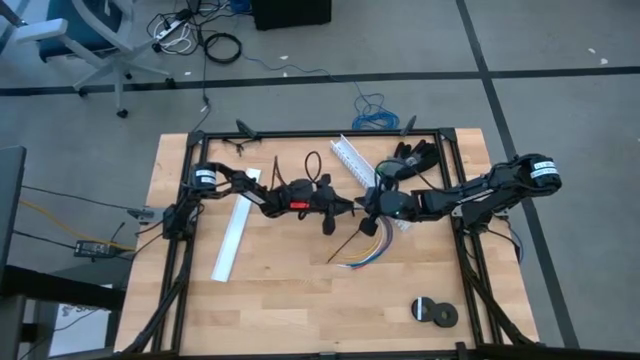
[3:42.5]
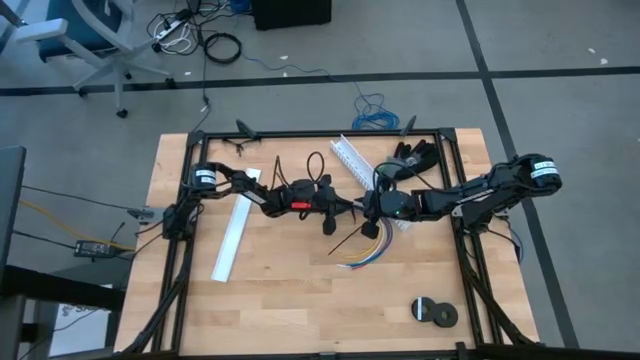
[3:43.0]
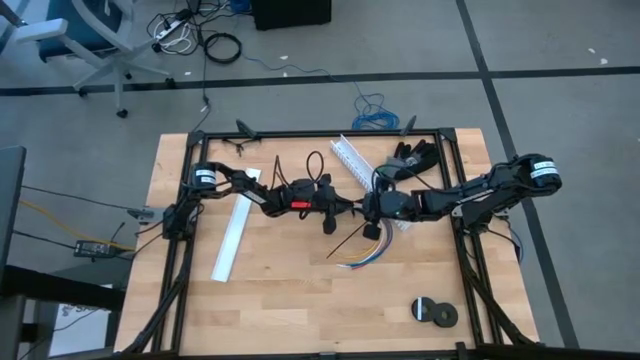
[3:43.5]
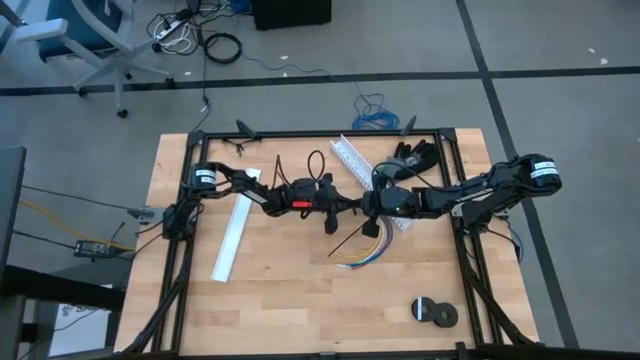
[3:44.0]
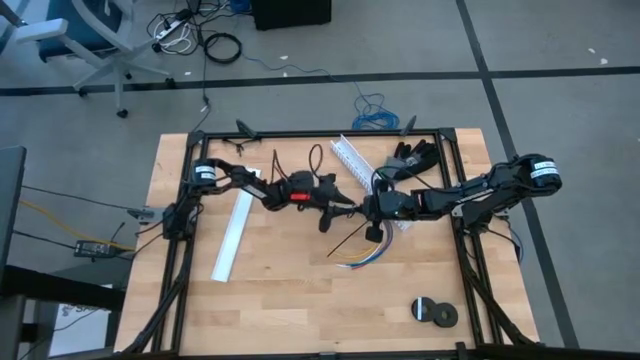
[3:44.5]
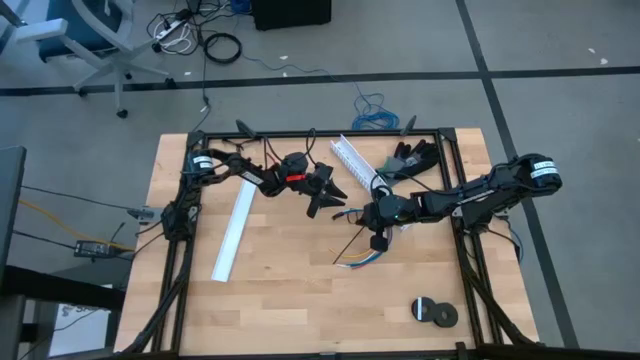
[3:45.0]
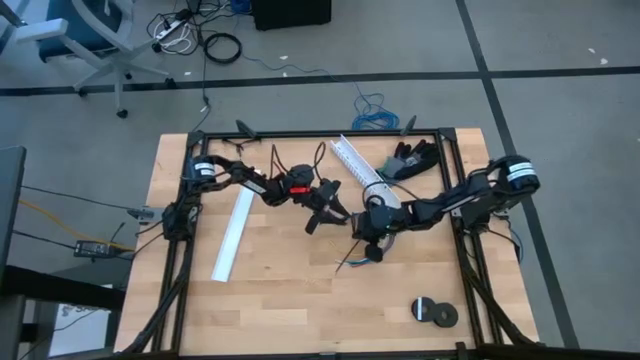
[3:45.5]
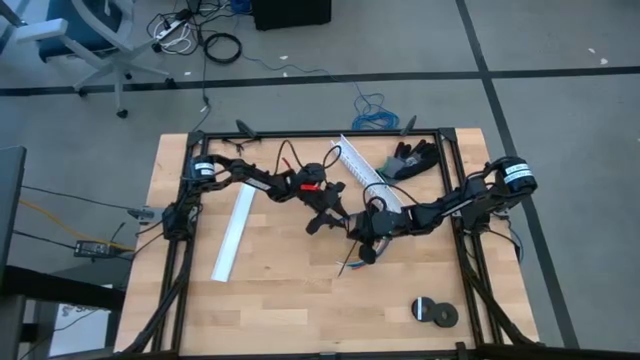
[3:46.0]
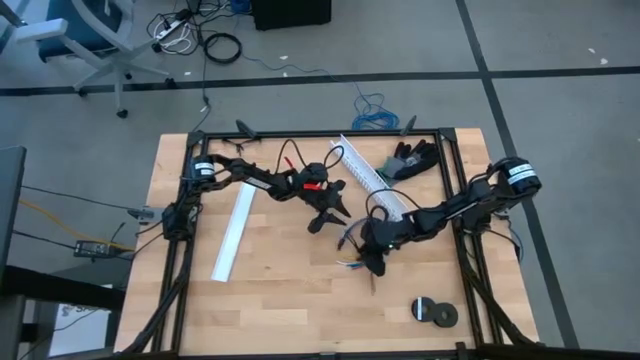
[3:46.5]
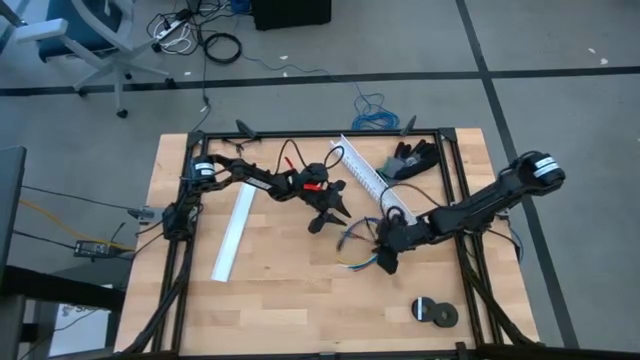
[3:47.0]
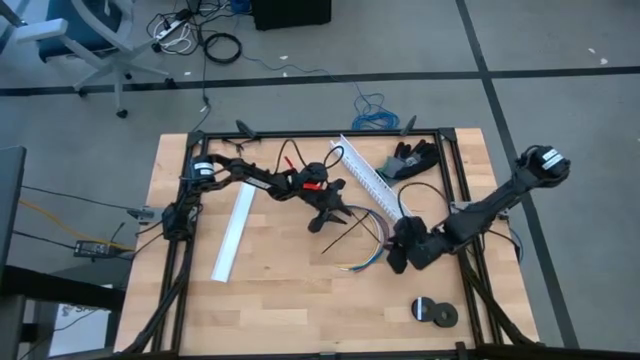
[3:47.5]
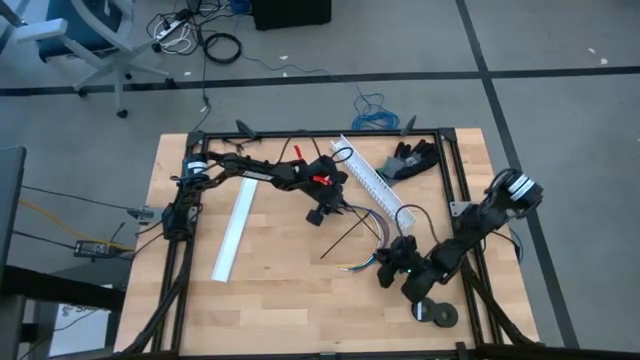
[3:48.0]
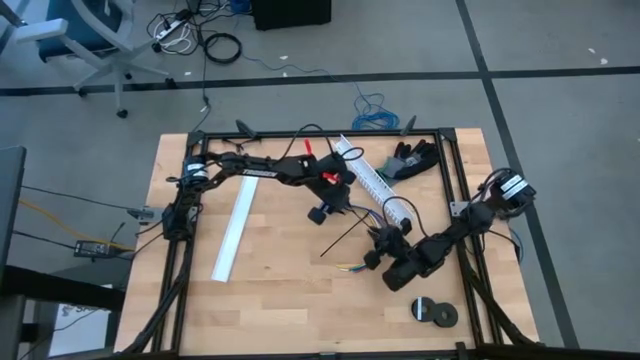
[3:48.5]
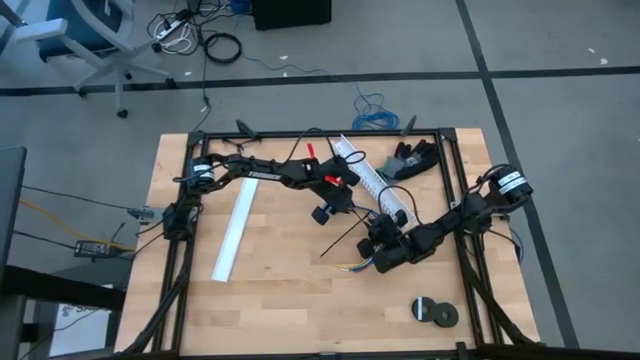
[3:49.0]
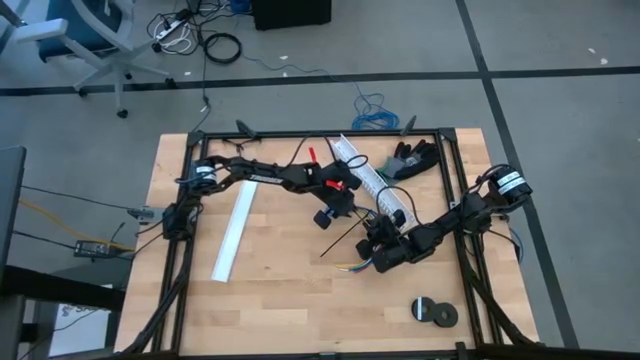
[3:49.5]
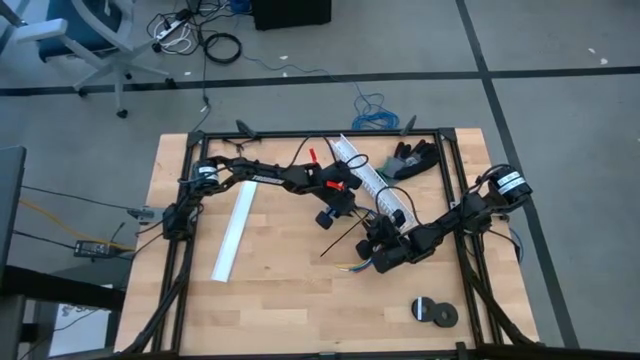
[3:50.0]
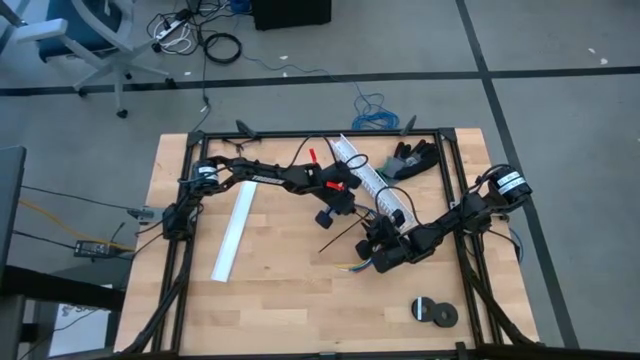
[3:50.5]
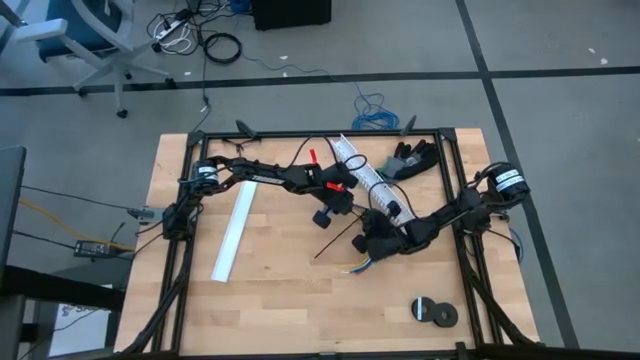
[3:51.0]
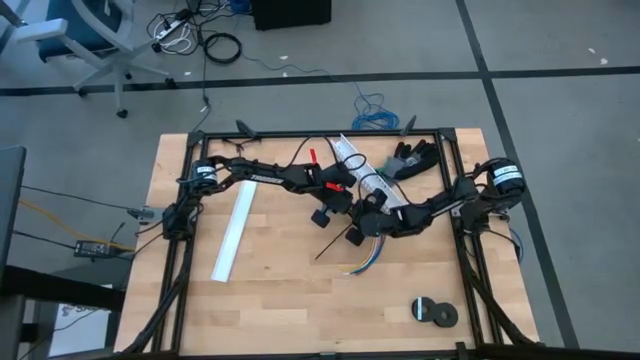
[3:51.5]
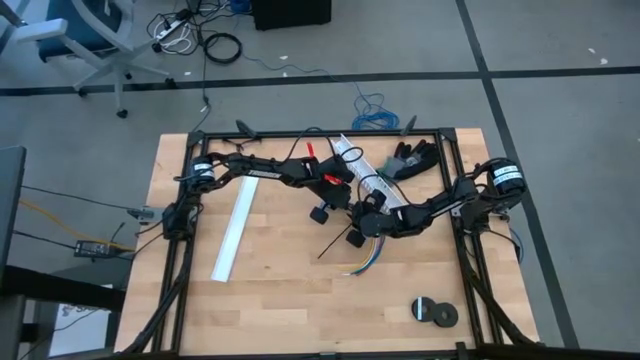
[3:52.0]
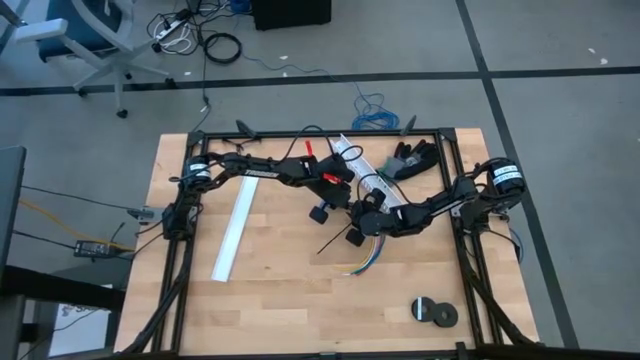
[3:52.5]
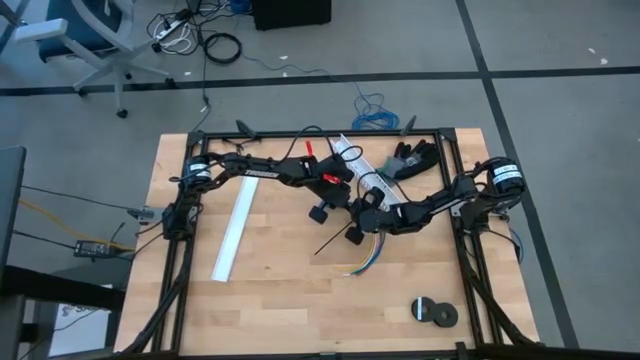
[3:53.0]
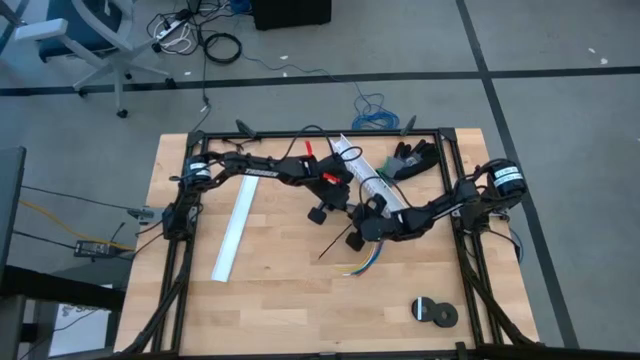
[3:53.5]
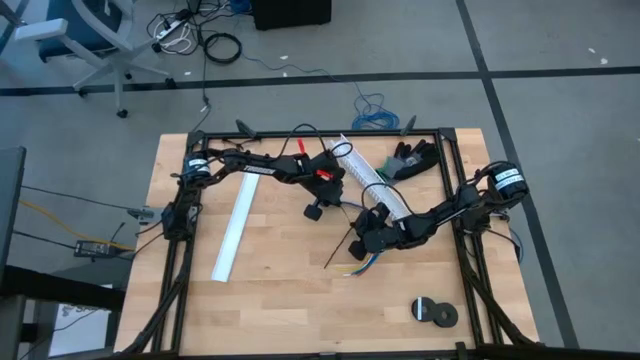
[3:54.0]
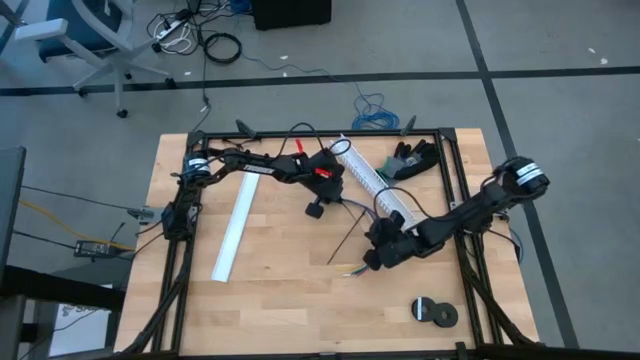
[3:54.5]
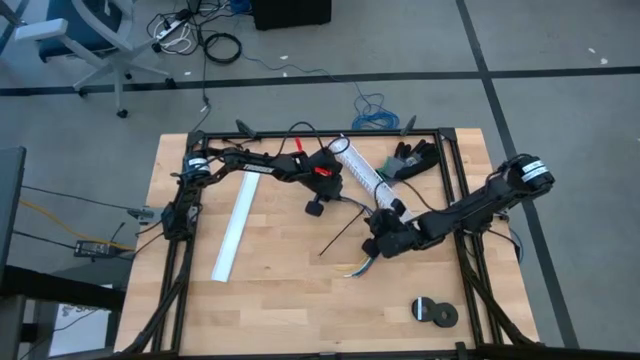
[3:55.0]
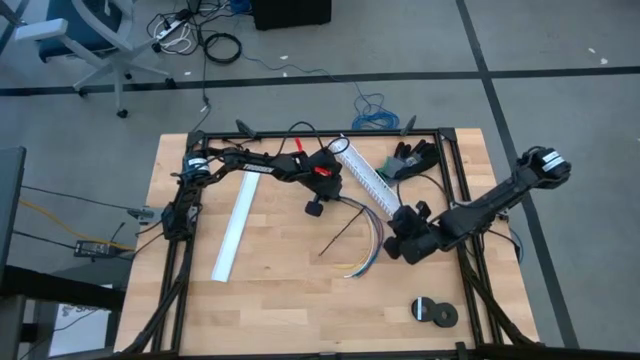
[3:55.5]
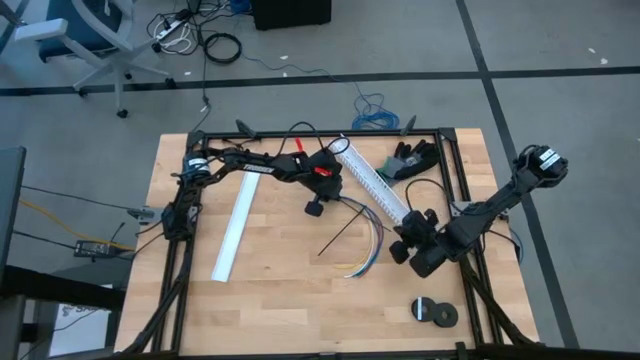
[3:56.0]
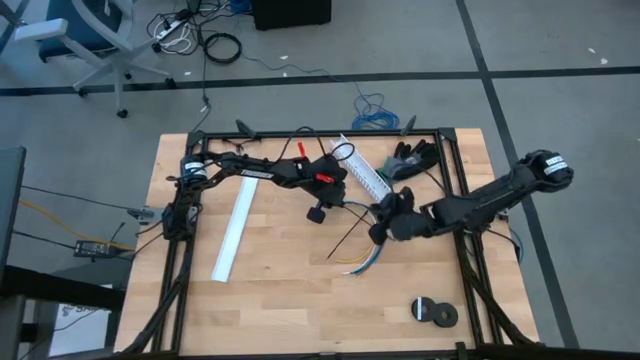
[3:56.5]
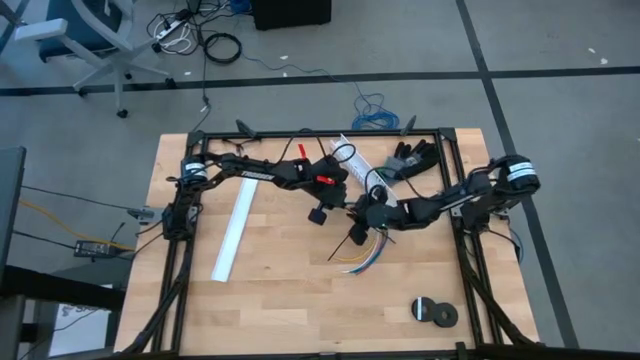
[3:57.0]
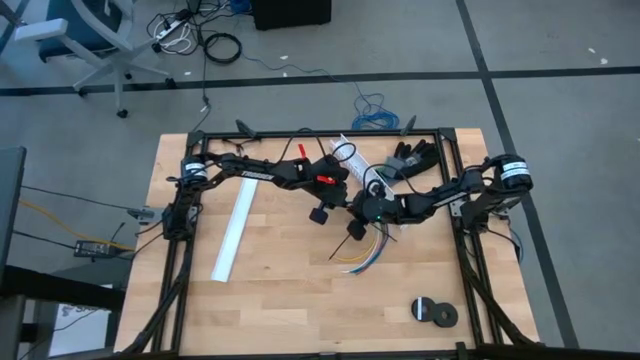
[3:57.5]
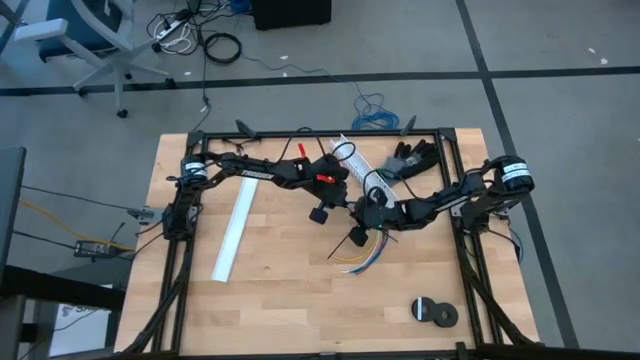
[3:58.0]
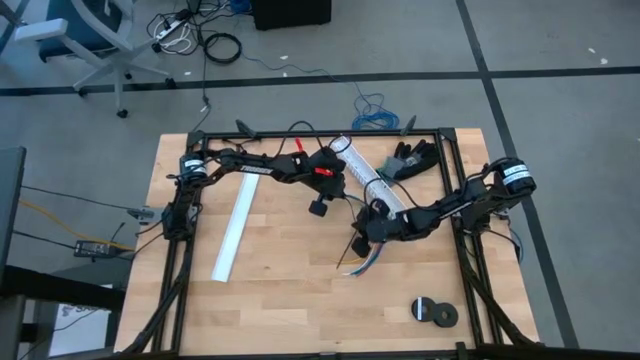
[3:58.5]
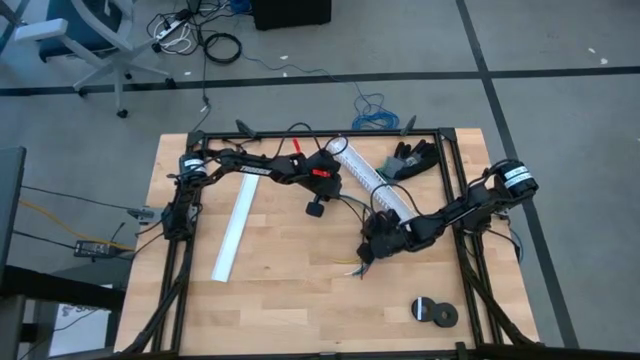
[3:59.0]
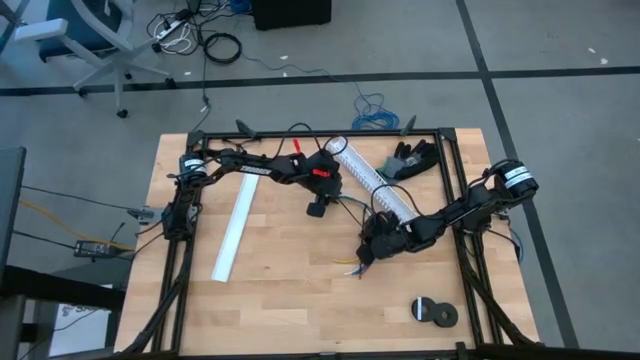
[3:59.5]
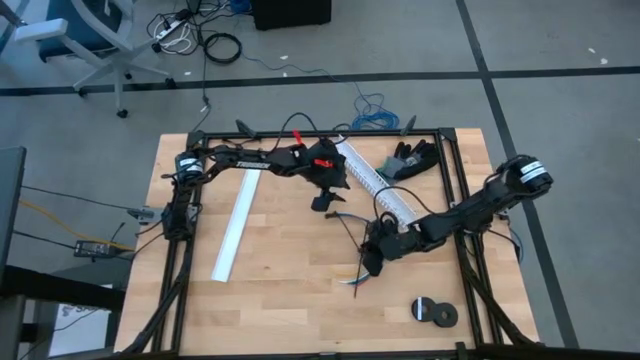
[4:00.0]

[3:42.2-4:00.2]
Task: Ziptie cables
Wrap the cable wires with black zip tie

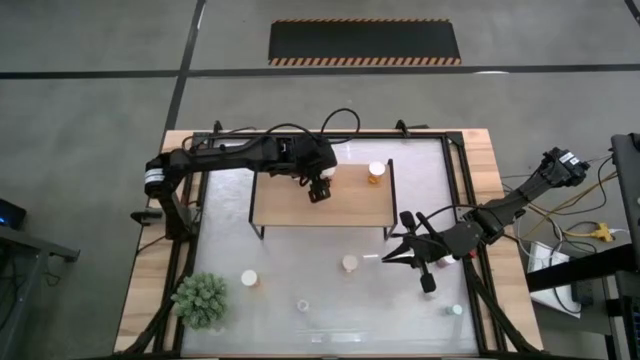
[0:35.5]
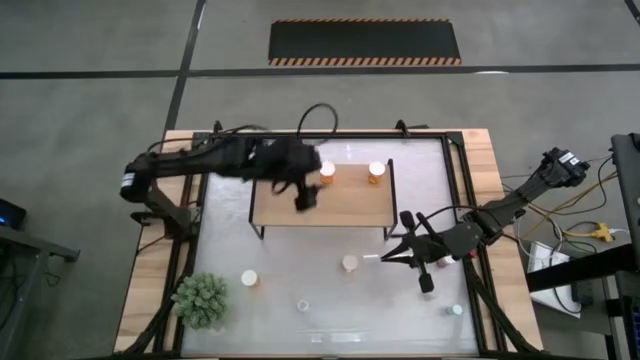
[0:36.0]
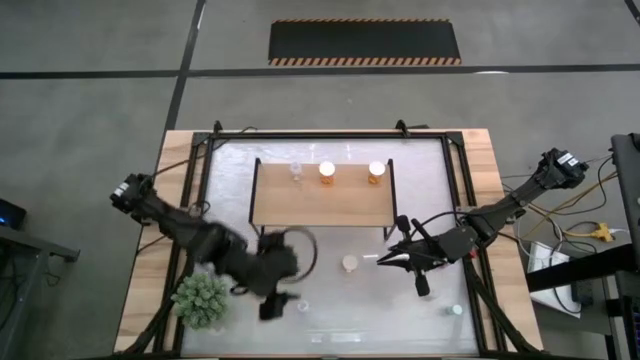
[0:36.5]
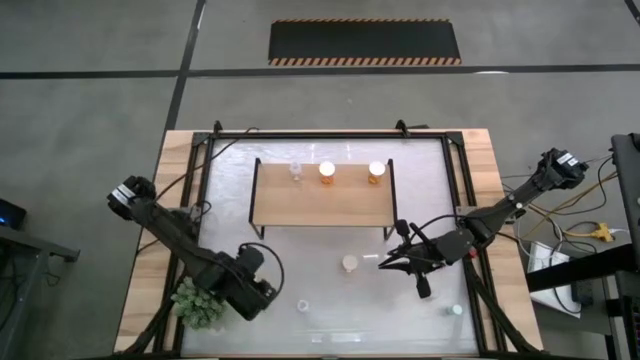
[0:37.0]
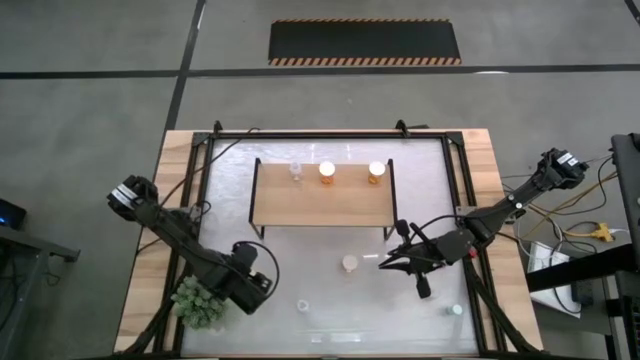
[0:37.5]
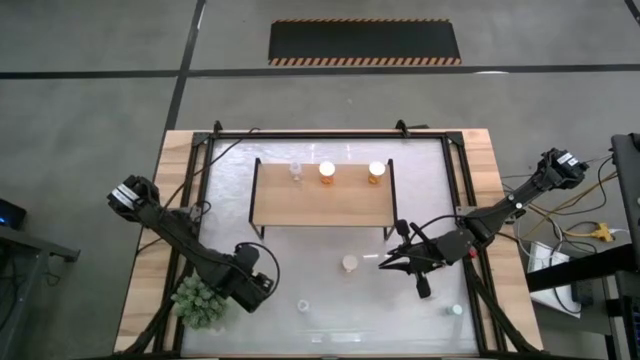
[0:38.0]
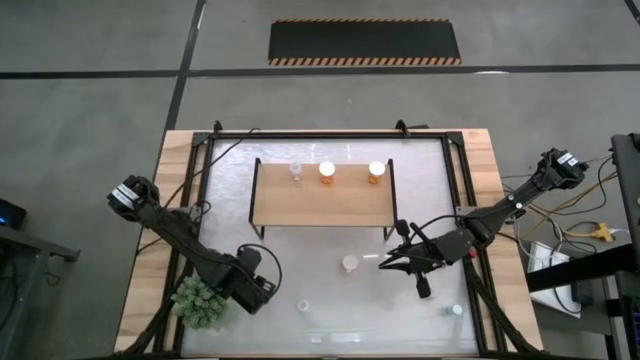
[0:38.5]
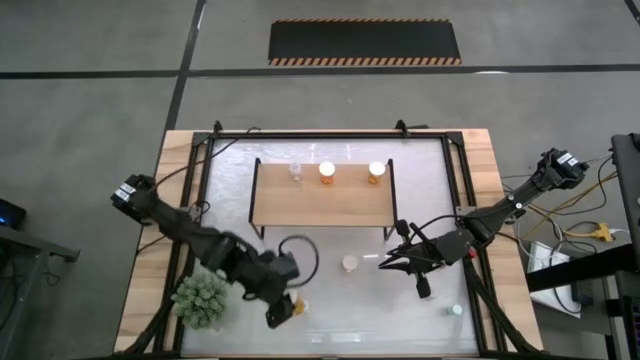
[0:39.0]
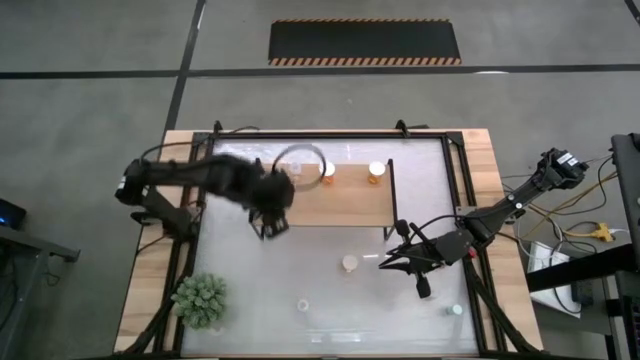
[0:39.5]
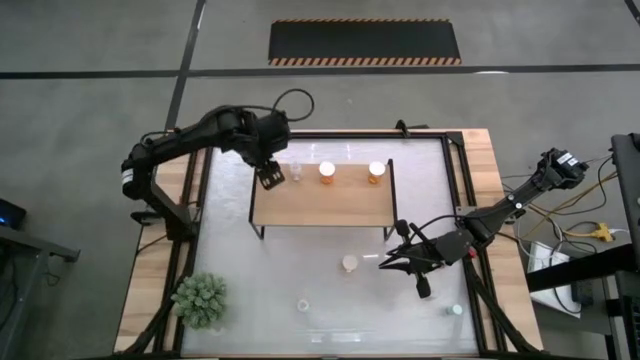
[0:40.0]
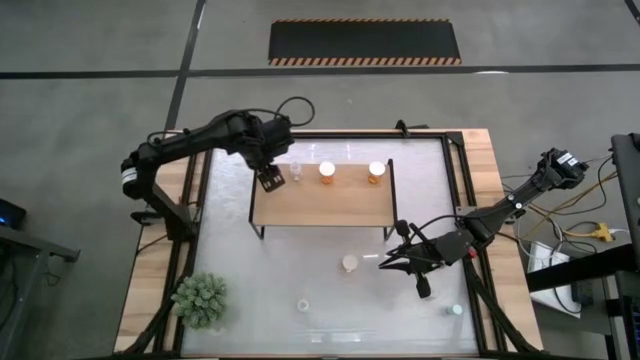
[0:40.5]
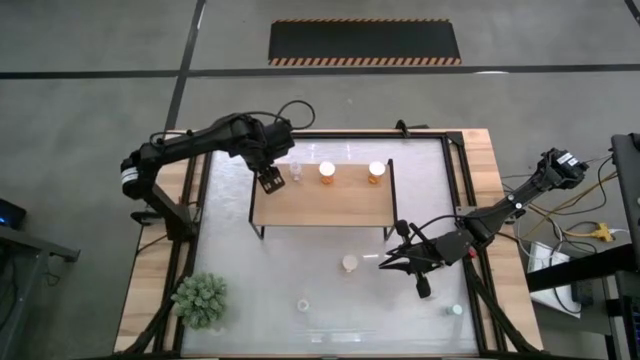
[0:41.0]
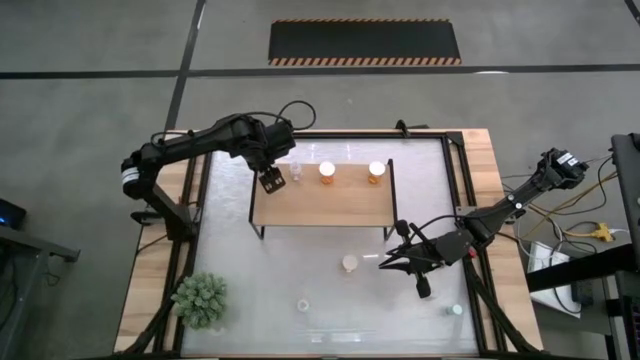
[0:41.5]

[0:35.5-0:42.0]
Task: Pick and place medicine bottles onto shelf by color
Put the orange pill bottle on the shelf
